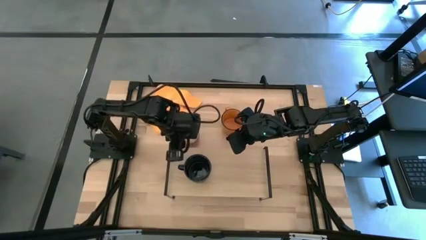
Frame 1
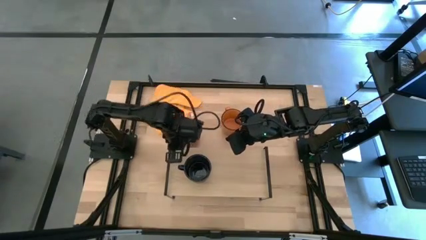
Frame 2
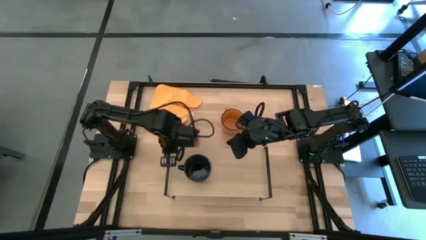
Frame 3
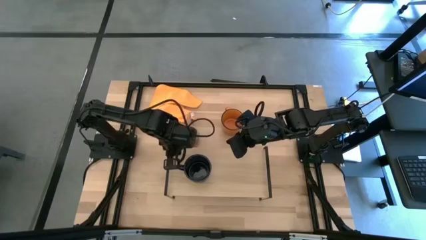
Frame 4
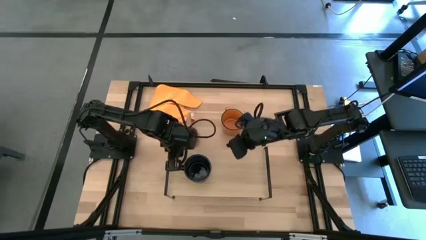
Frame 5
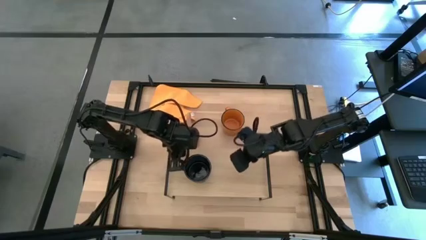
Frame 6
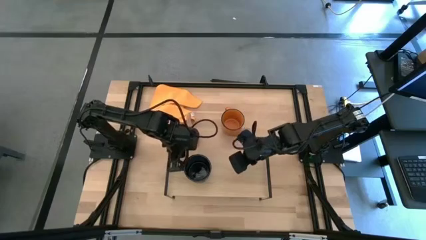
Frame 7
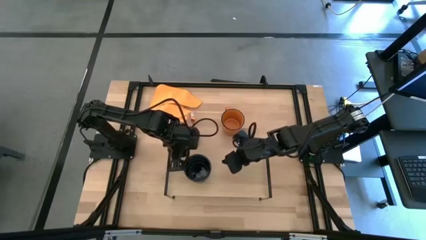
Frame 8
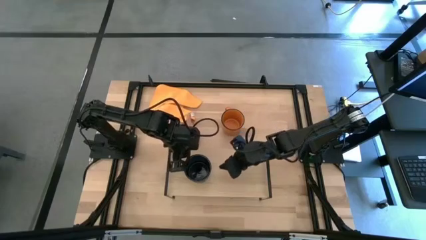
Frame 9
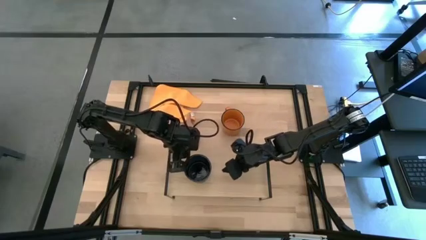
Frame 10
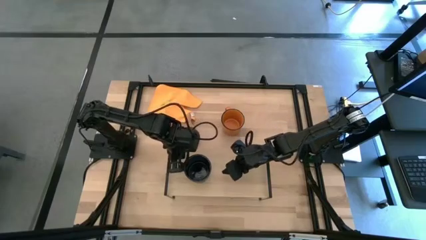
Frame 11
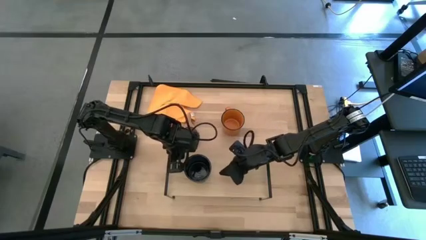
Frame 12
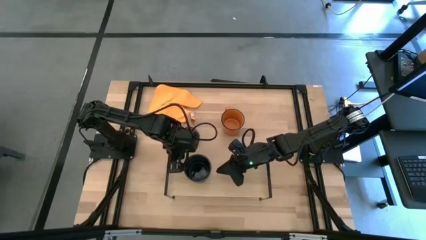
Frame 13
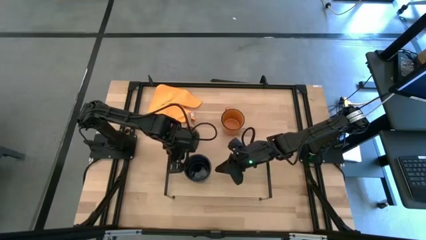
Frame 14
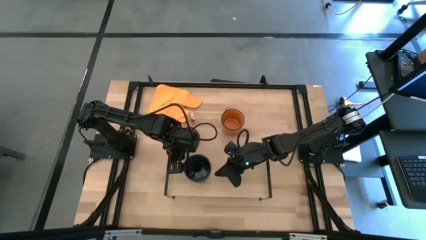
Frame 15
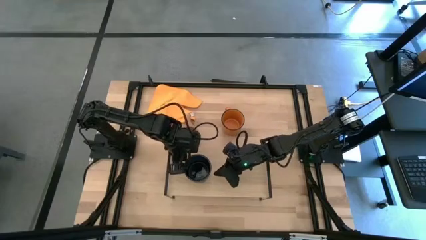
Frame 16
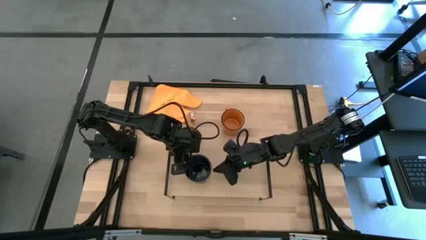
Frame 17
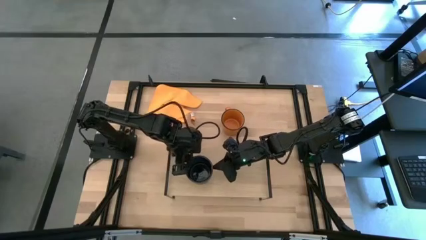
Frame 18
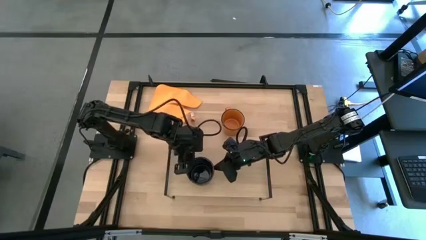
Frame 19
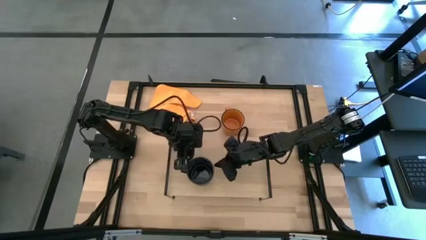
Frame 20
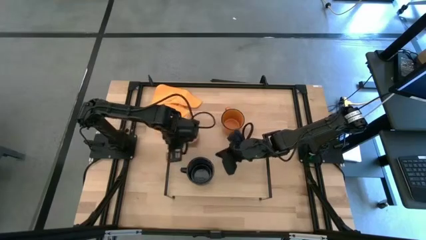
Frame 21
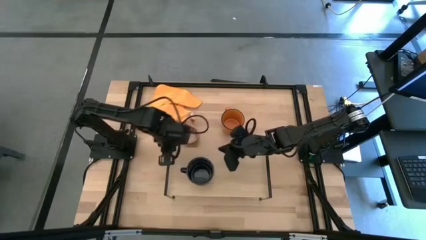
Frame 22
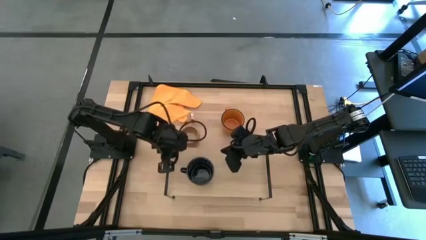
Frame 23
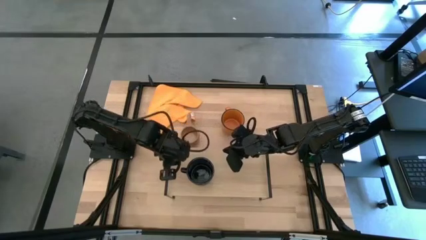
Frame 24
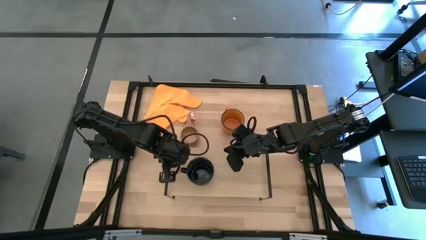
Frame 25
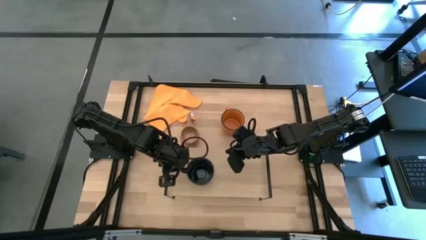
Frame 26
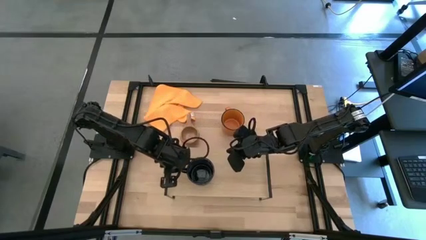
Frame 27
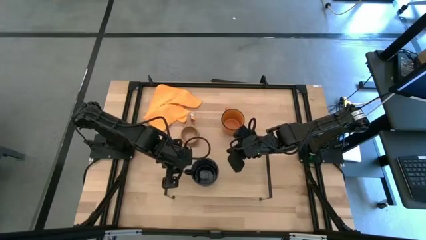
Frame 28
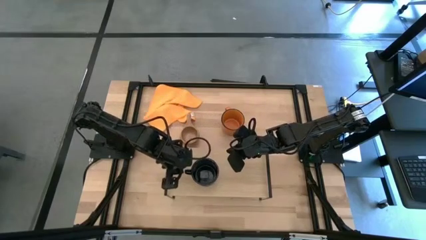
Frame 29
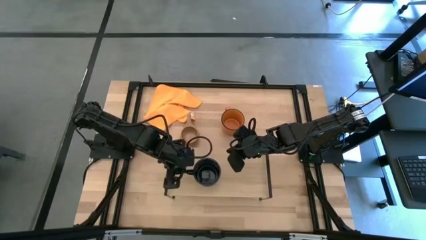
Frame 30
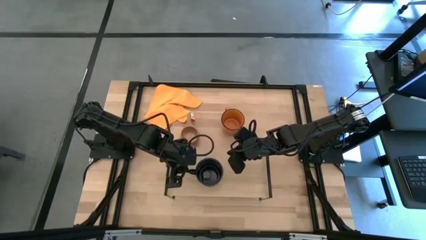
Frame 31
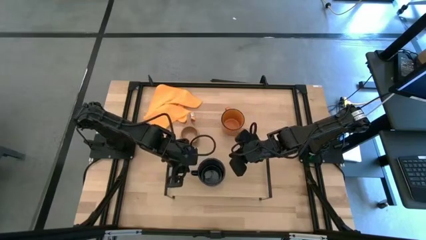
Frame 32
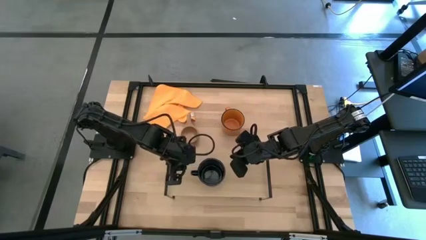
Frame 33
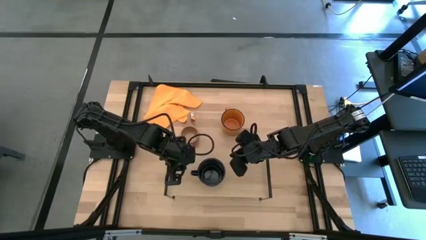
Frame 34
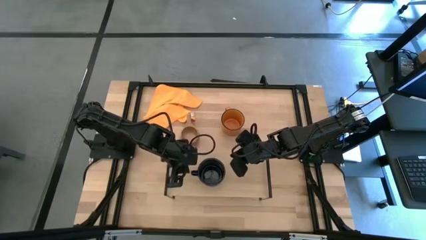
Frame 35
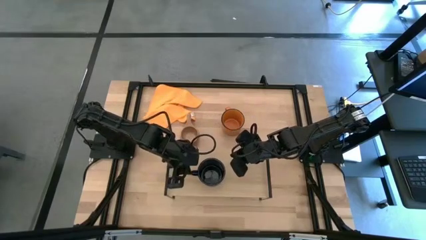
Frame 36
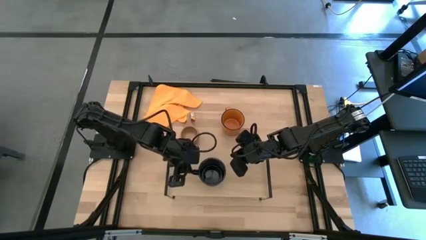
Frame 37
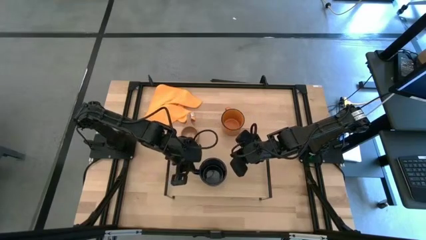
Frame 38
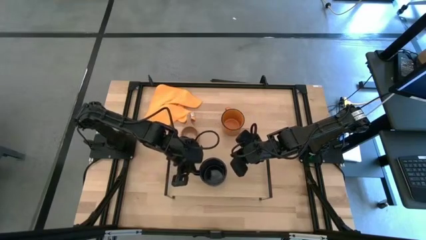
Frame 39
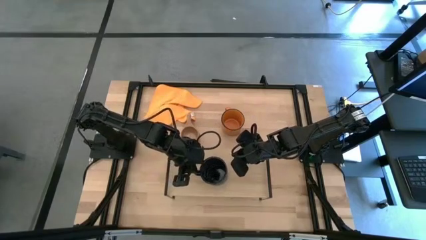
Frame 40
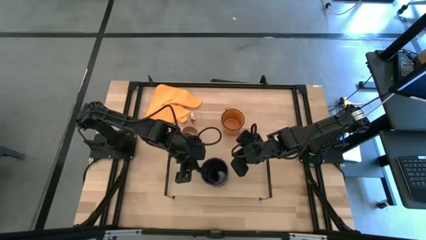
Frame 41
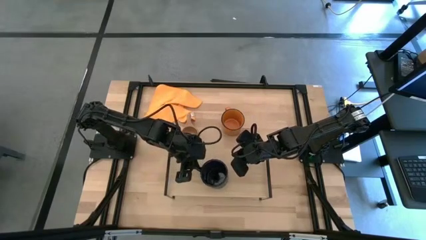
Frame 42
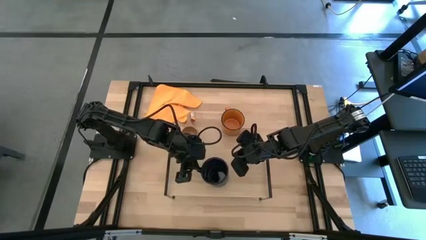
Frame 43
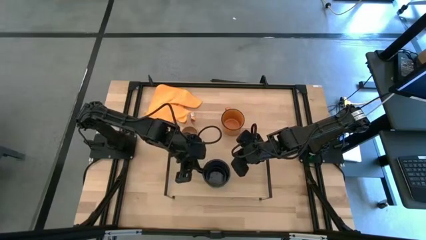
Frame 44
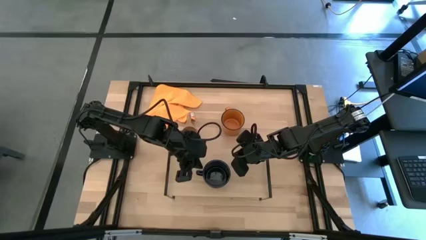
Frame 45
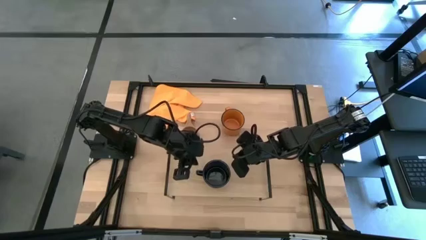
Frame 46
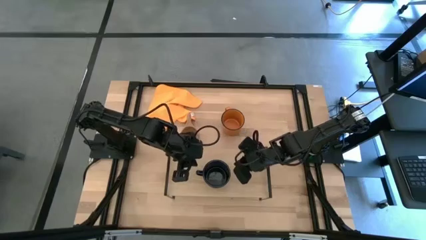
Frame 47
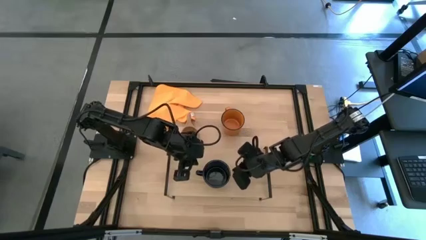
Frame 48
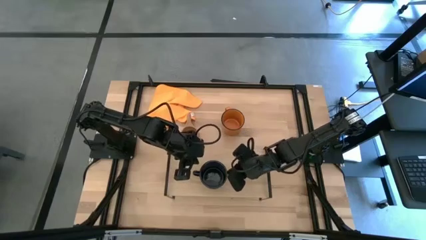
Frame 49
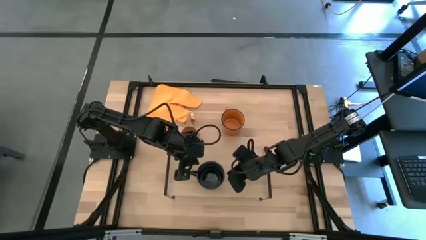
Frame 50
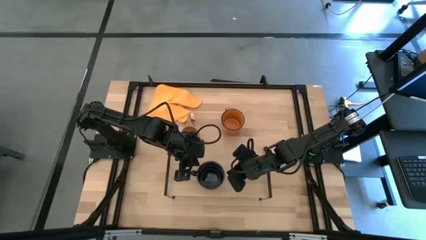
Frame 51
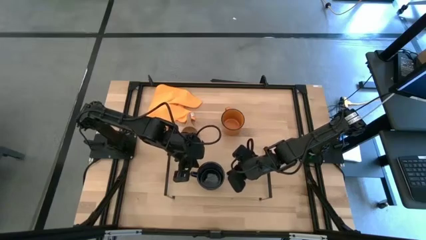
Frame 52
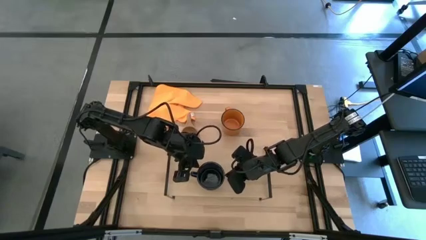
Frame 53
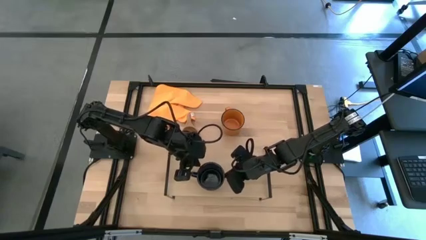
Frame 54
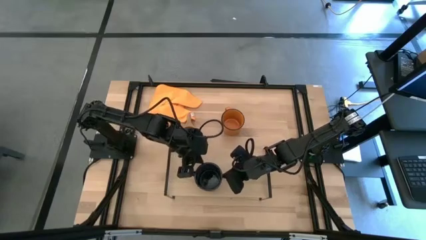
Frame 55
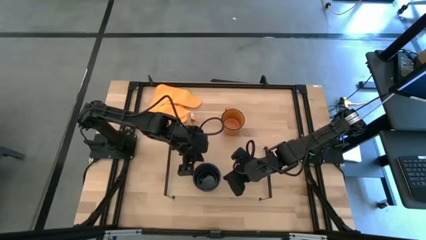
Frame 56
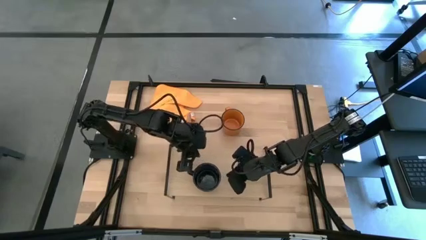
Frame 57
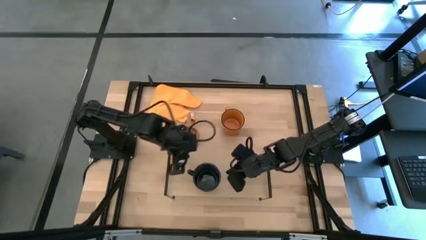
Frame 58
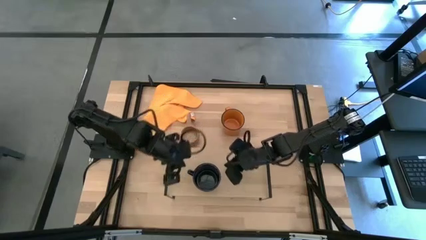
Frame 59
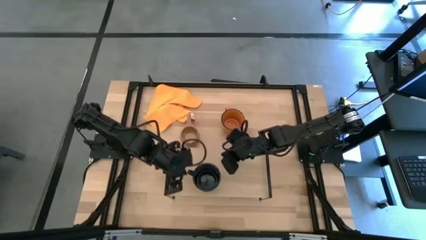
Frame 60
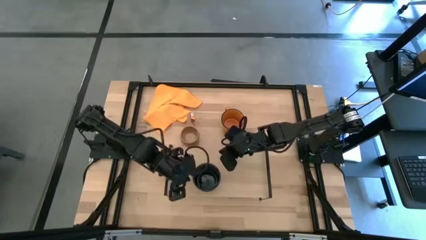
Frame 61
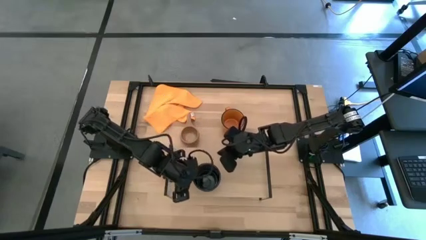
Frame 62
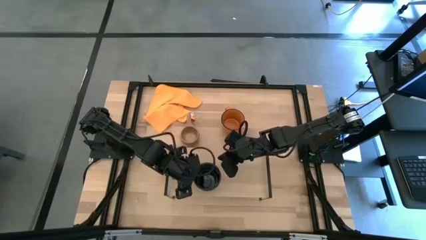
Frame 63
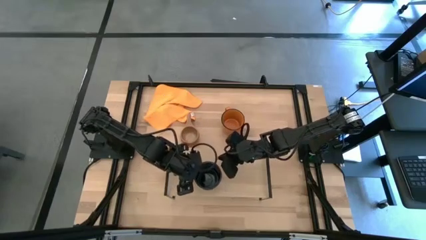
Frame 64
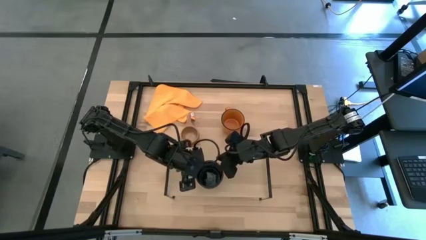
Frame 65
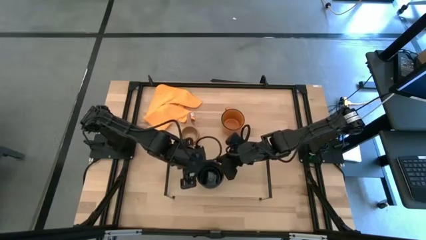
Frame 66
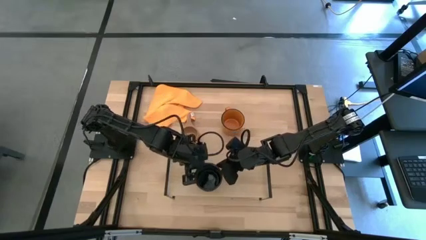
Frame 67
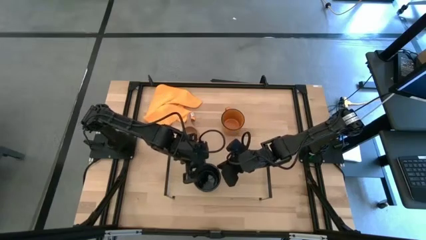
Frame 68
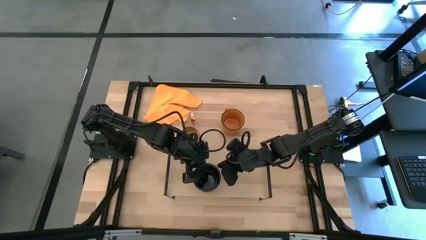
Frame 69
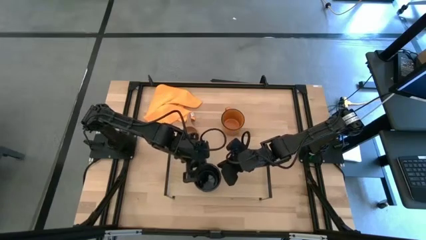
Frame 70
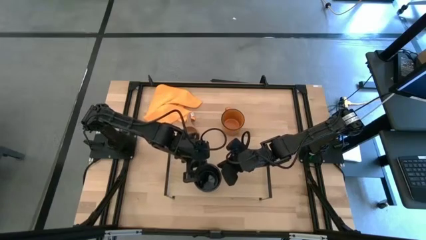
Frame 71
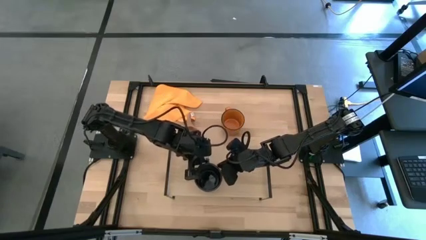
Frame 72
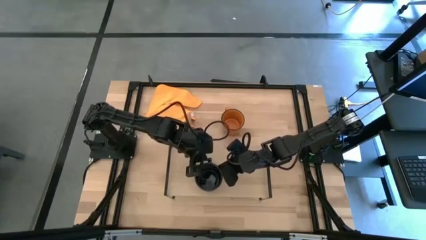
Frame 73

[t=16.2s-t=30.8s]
Task: Stack small to large cups/mugs on shelf
Put the dark blue mug on the shelf

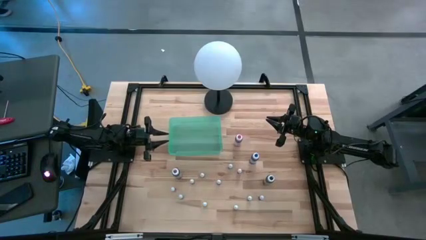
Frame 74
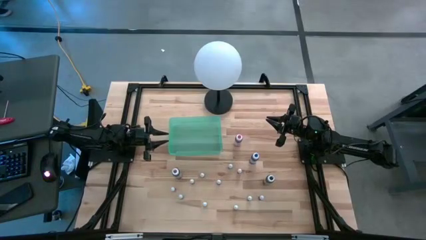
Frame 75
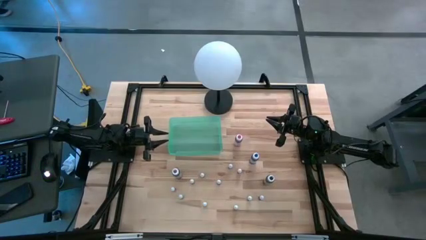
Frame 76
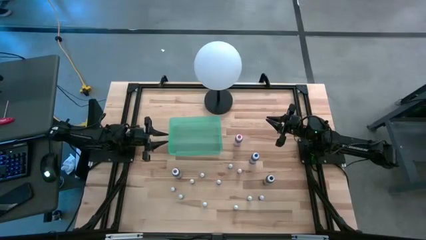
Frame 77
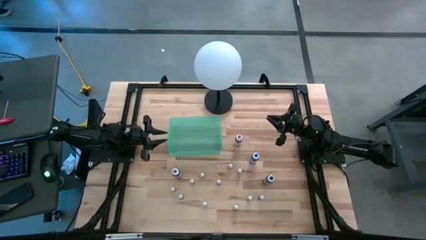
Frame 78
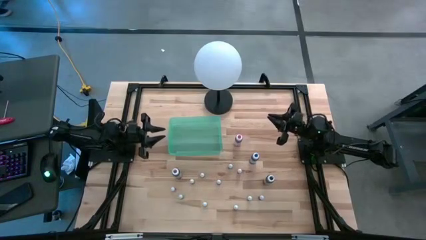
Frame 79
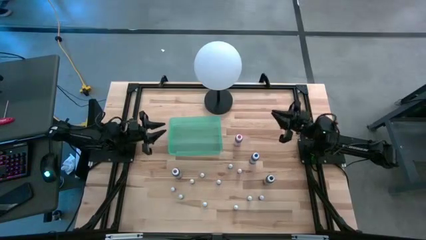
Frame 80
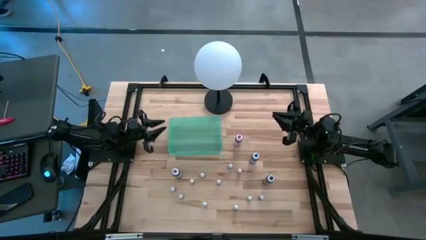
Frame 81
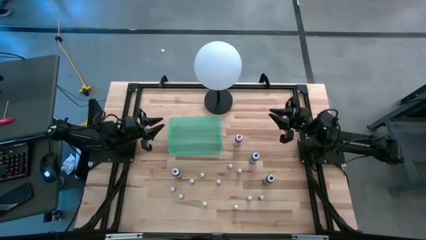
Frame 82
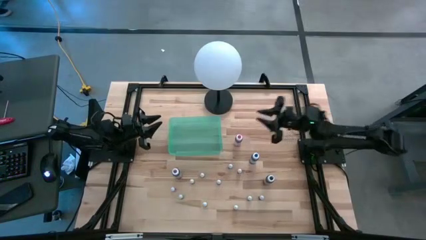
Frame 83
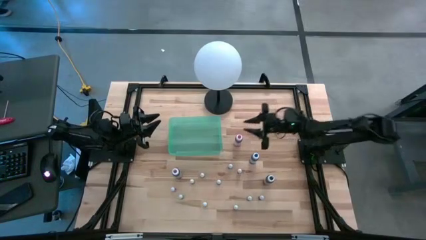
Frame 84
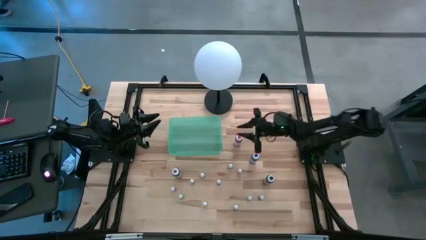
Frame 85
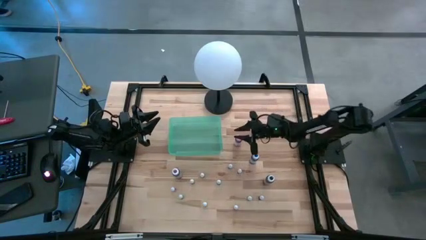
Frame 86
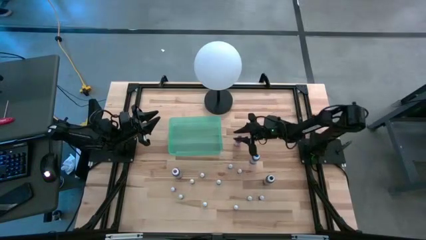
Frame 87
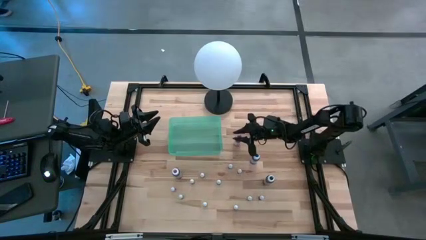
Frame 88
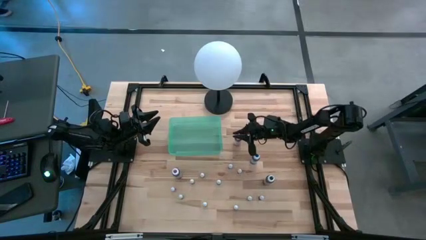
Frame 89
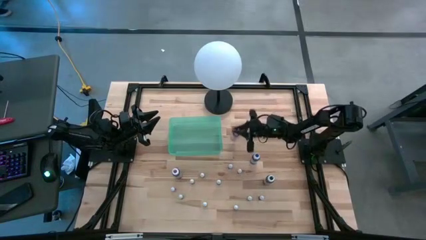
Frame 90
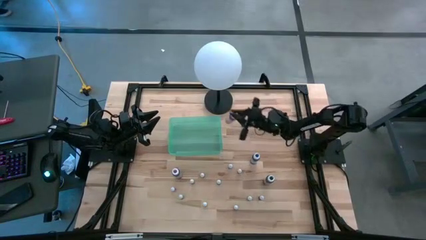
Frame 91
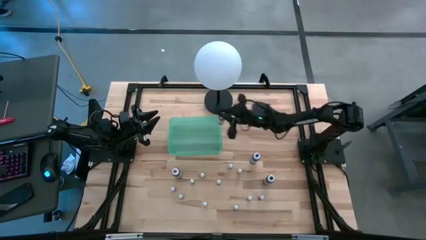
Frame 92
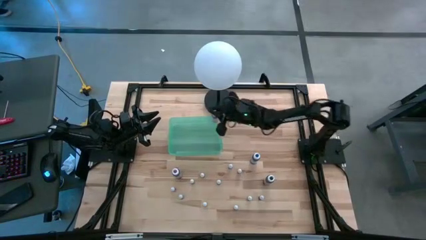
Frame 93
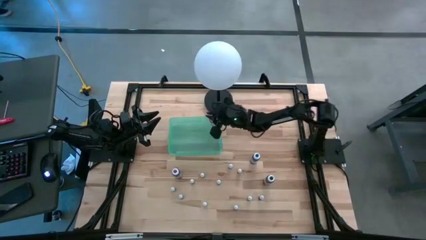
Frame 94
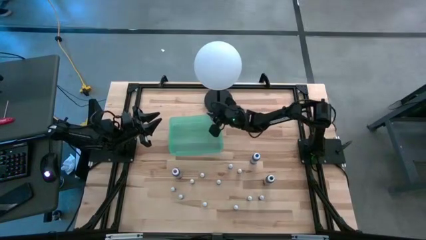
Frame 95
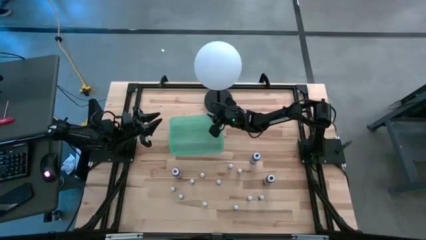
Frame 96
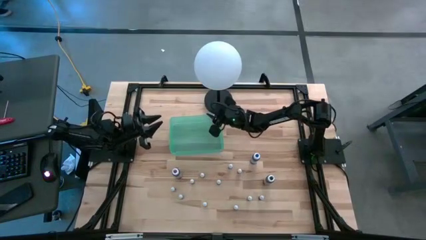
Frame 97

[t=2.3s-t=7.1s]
Task: Pick & Place food coloring
Put the big red food coloring bottle into the green bin
